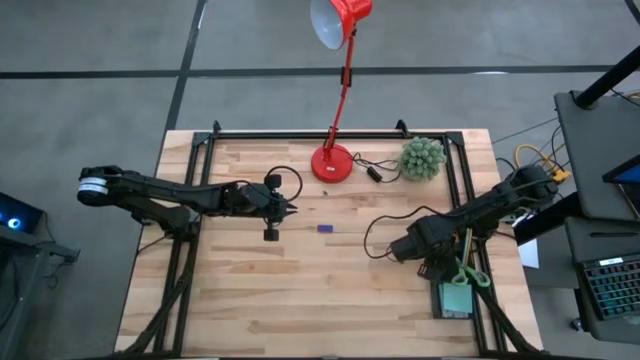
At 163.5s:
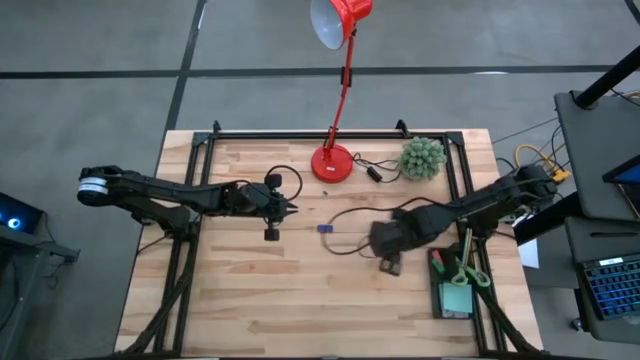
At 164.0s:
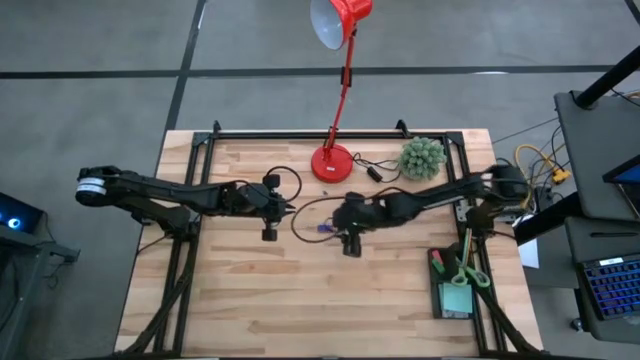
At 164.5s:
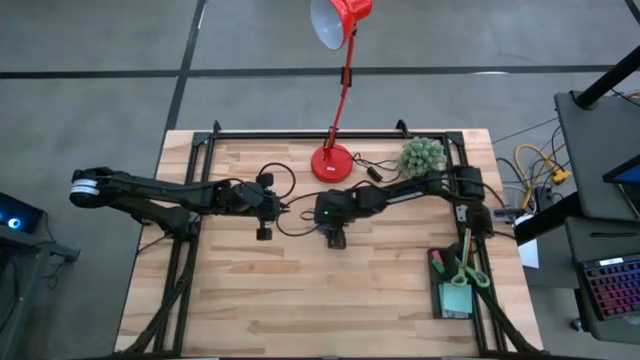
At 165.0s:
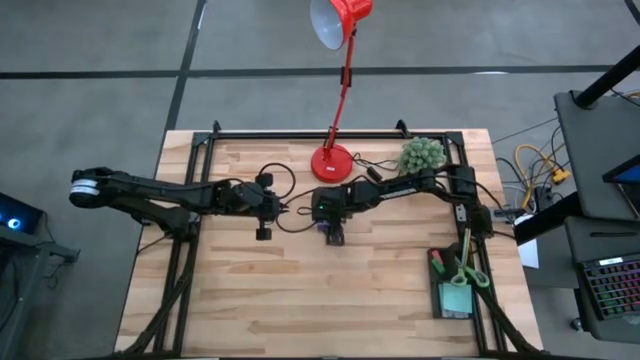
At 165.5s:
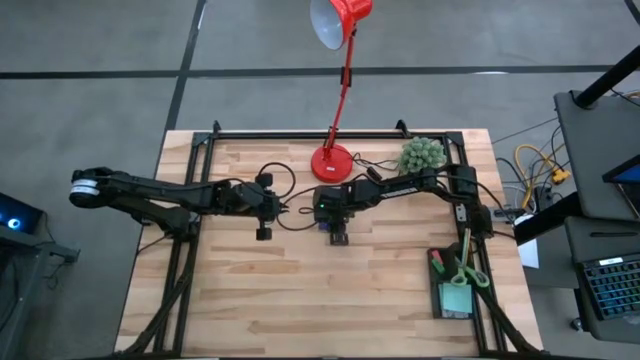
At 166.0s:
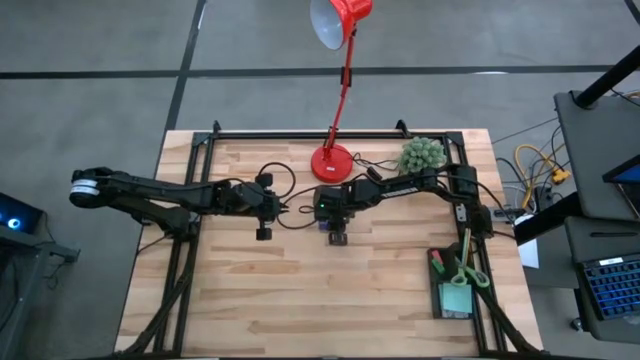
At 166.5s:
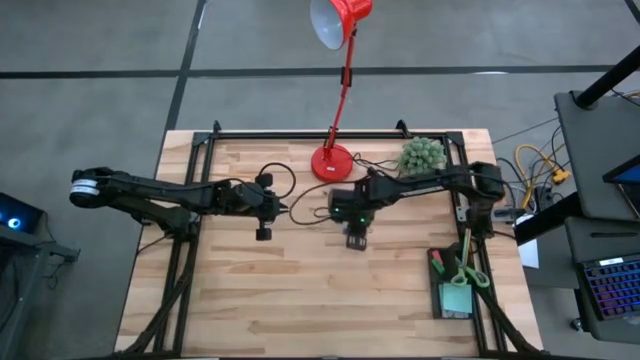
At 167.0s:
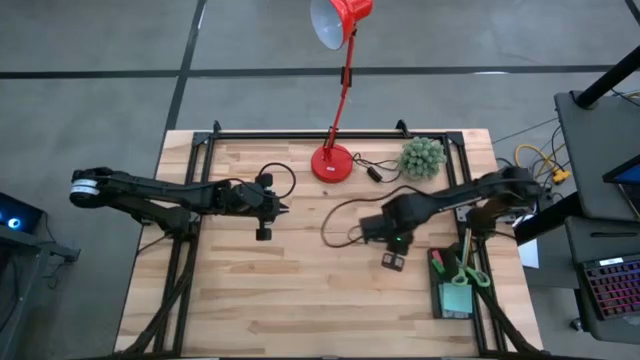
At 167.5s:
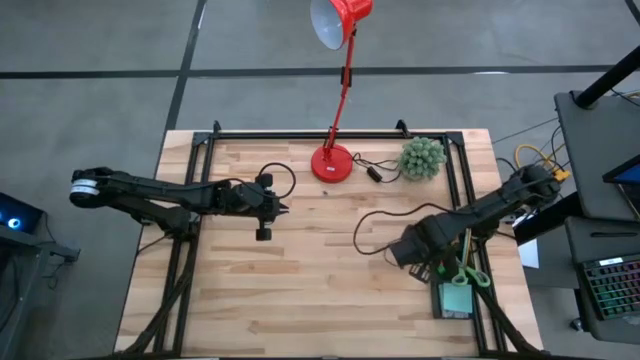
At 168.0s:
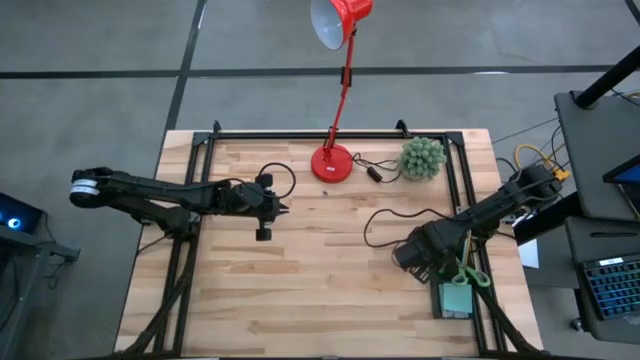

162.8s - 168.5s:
Task: Pick and place office supplies into organizer
Put the blue eraser into the black desk organizer

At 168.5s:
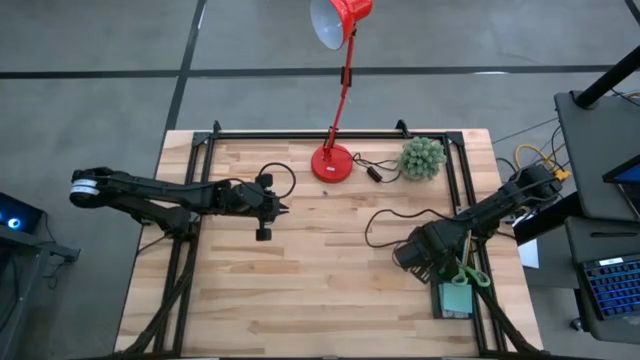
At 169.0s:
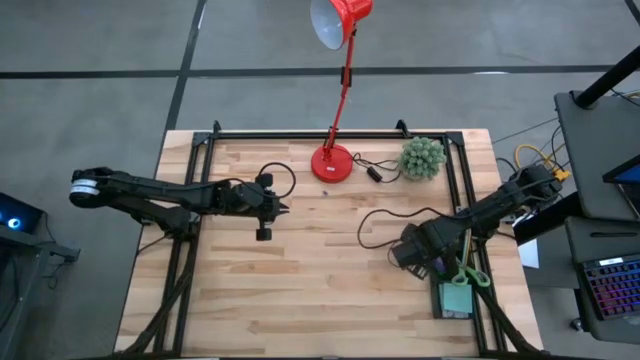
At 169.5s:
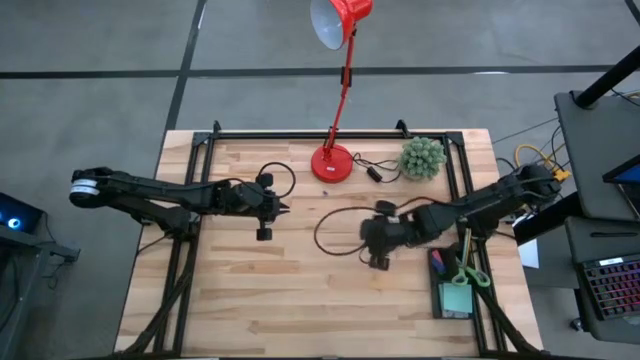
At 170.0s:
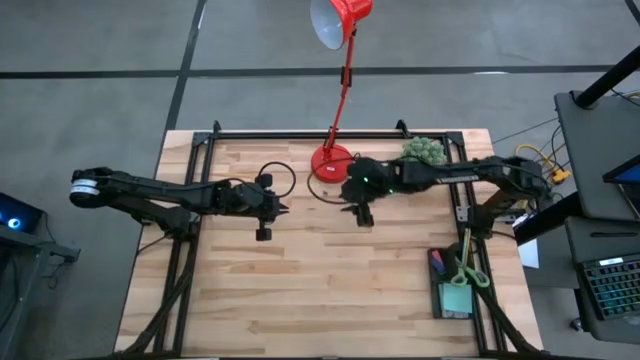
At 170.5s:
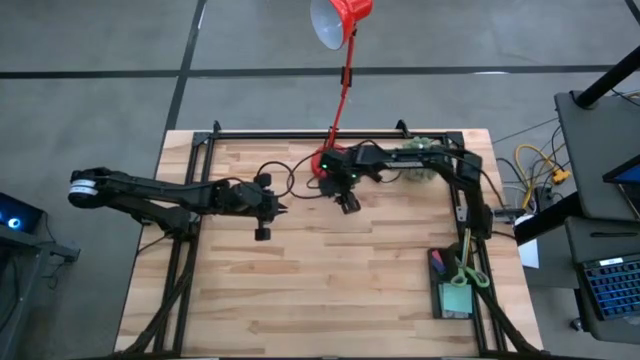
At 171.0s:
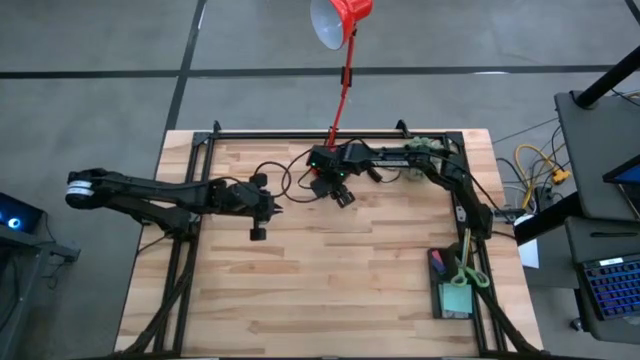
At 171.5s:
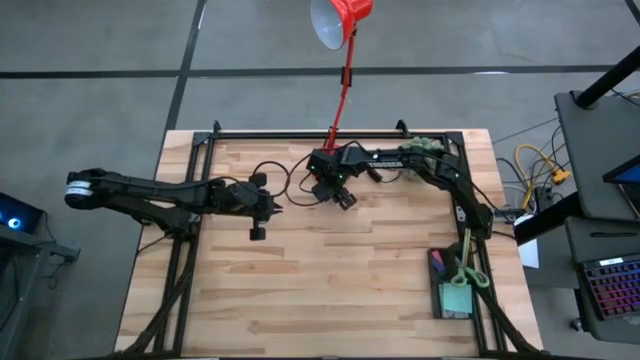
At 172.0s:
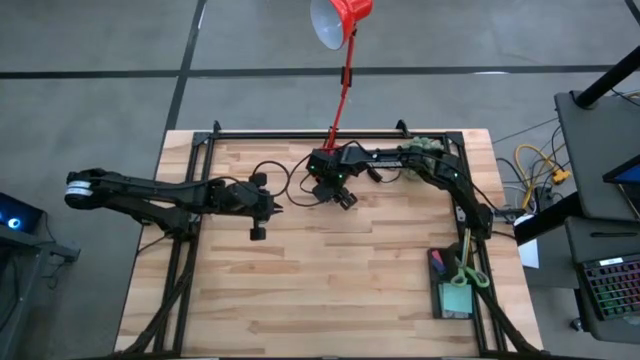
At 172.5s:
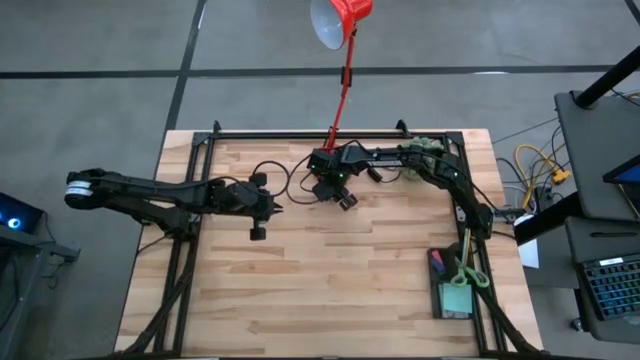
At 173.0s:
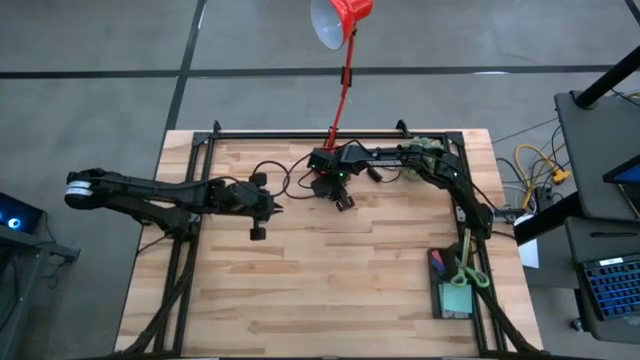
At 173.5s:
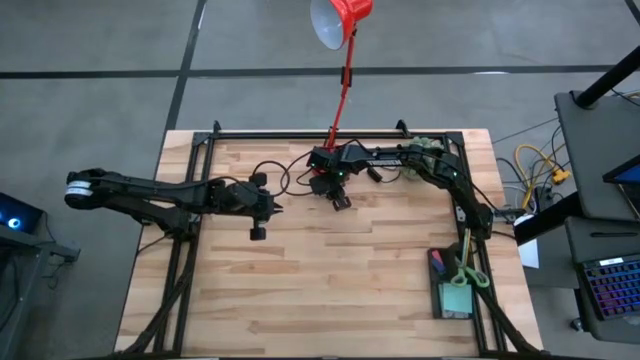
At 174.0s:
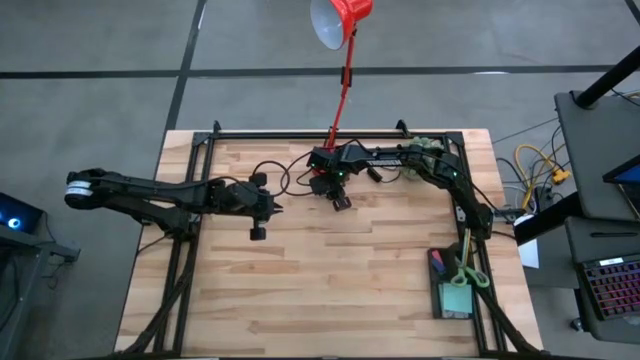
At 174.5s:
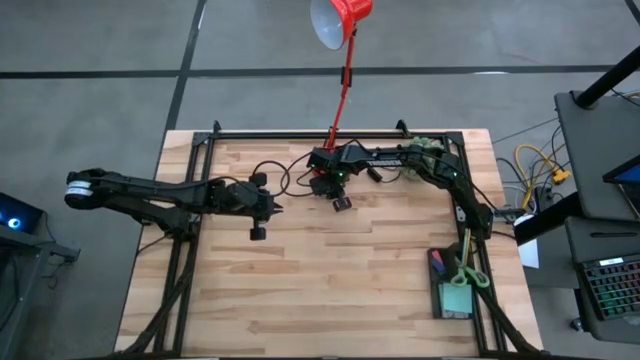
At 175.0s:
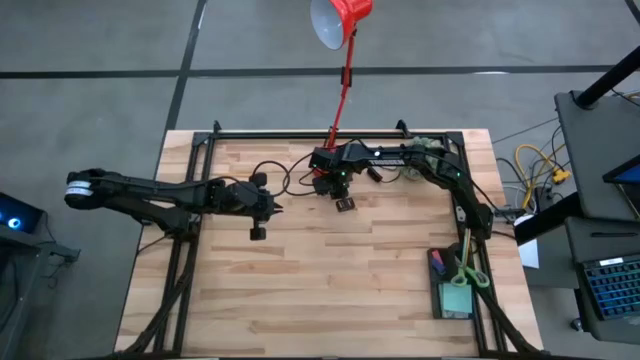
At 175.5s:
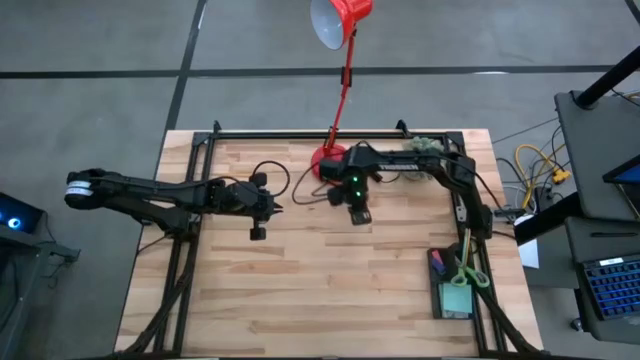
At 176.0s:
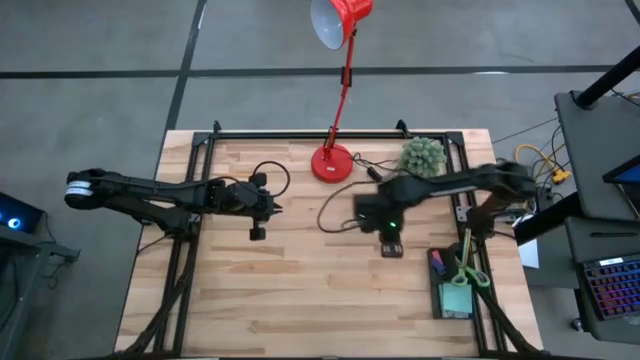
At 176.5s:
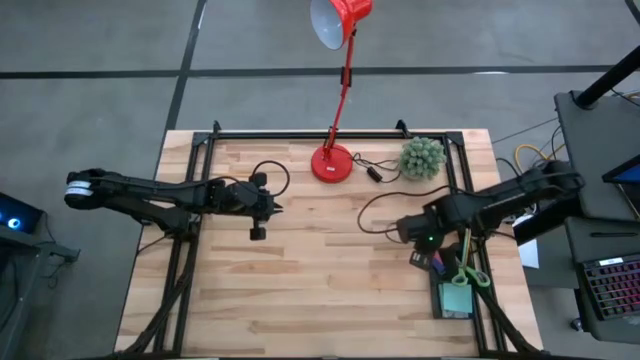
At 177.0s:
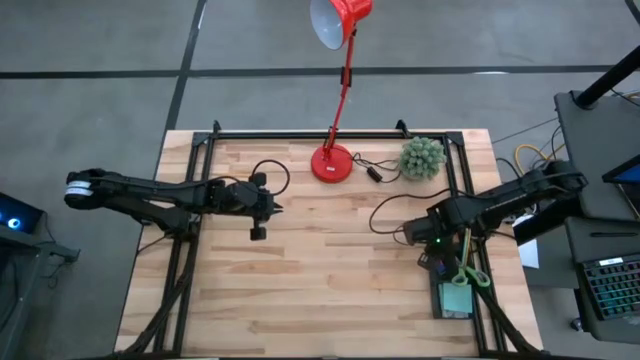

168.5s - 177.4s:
Put the blue binder clip into the black desk organizer

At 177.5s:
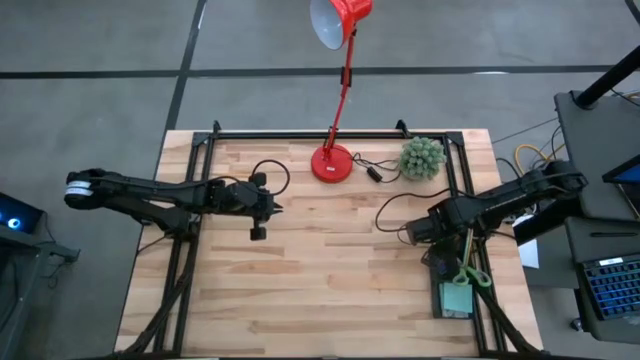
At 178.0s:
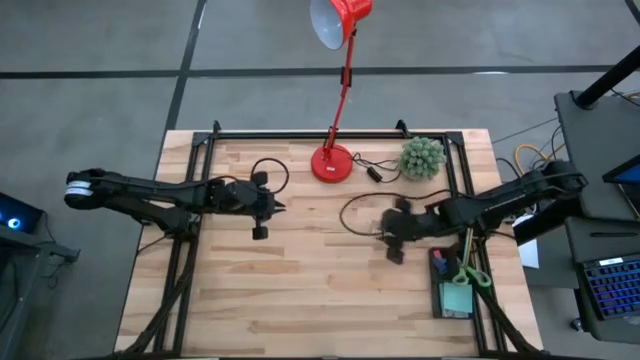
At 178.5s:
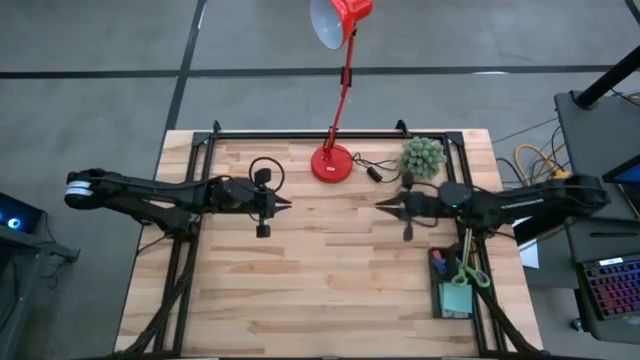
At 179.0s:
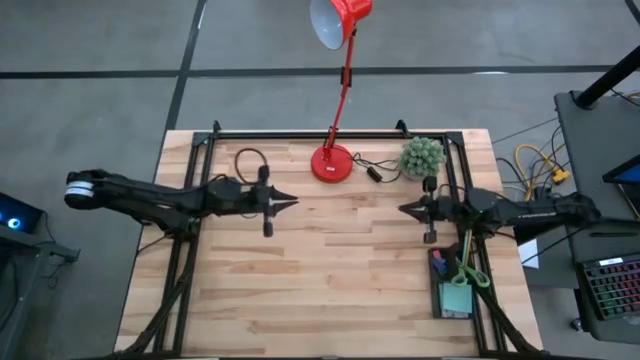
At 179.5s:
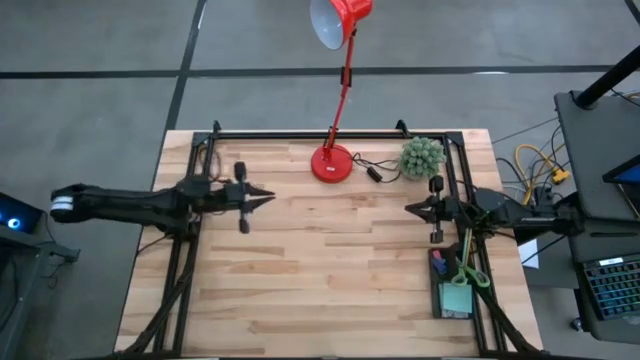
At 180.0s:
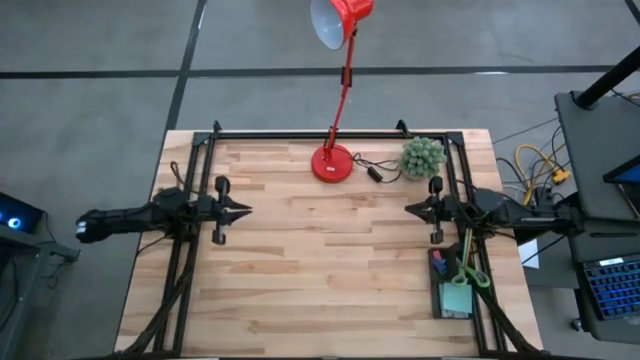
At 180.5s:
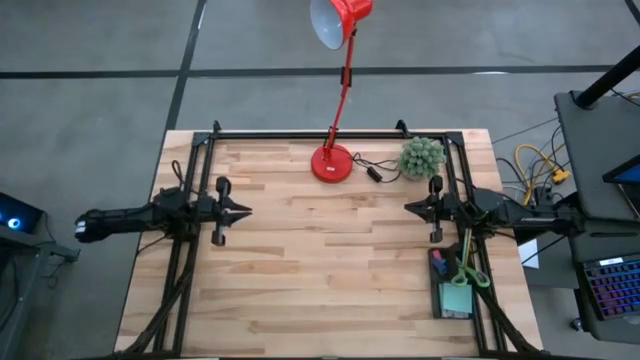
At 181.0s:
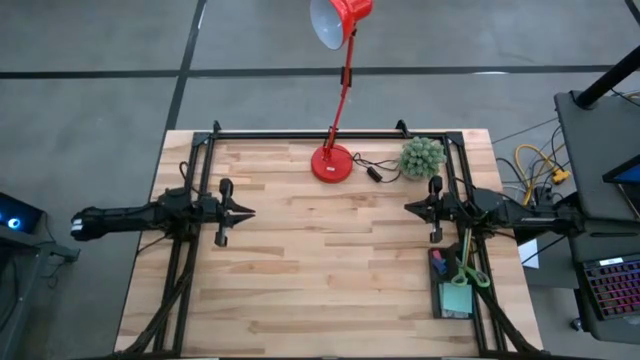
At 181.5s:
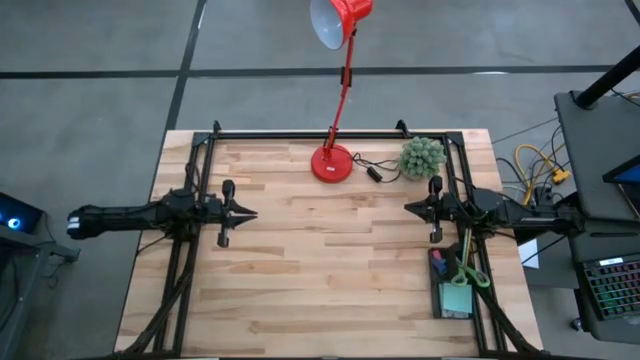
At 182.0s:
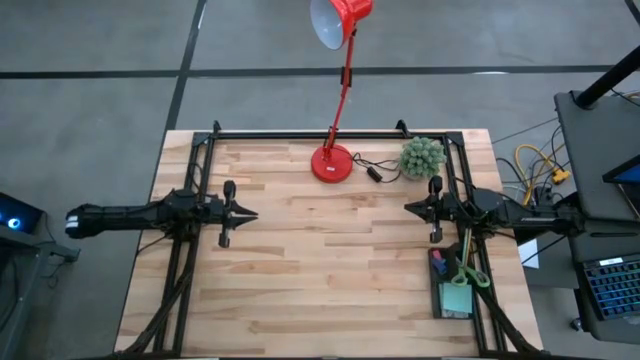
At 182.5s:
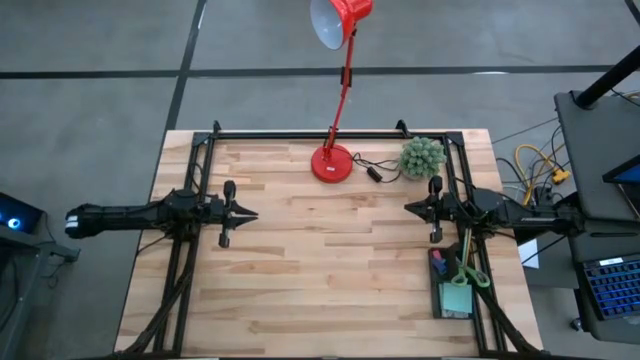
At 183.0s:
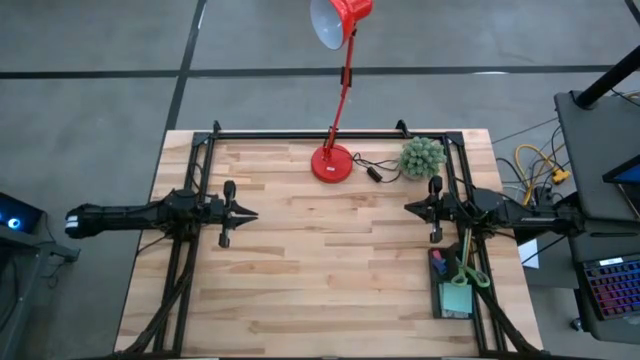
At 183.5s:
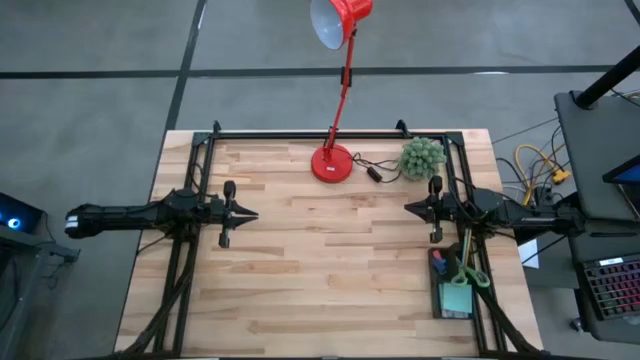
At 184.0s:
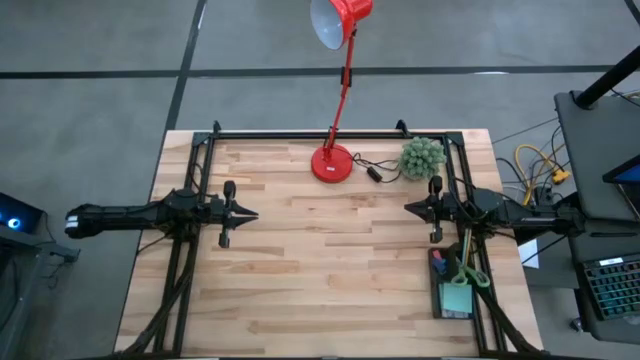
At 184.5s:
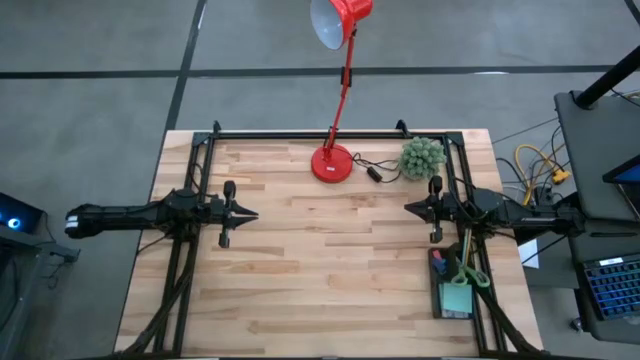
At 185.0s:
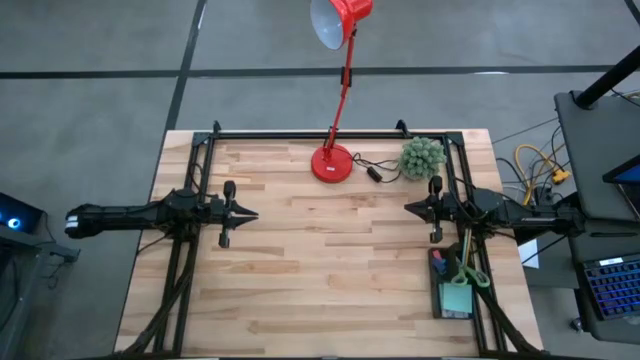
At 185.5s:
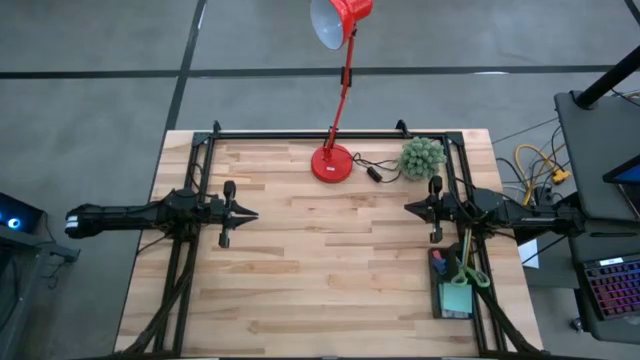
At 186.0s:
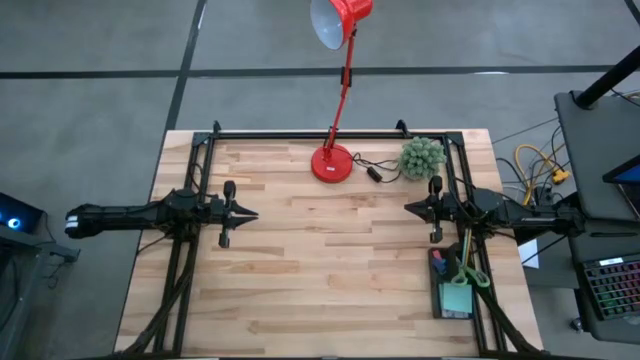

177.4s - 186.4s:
Return to Home Position
